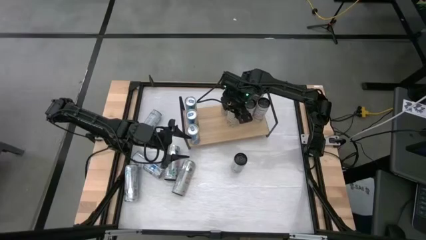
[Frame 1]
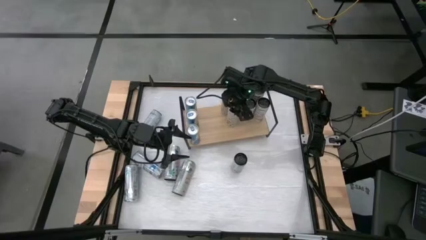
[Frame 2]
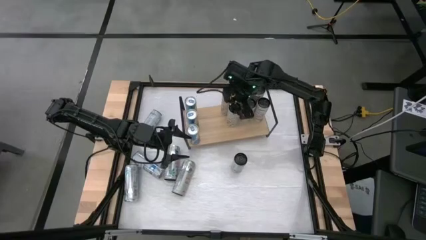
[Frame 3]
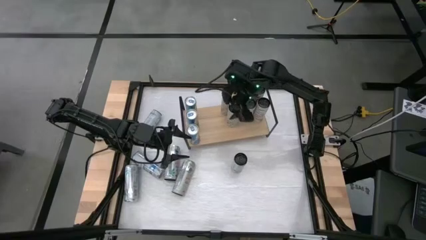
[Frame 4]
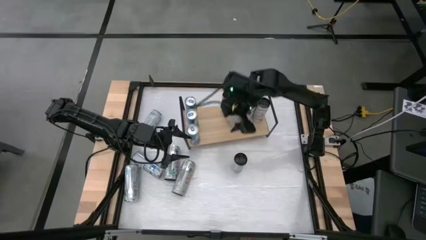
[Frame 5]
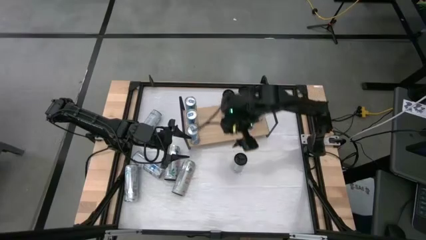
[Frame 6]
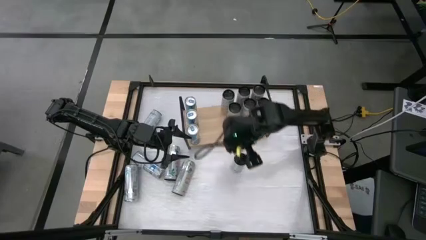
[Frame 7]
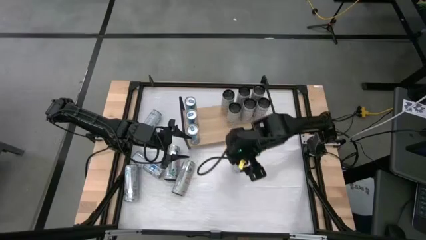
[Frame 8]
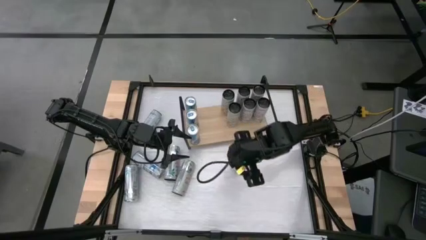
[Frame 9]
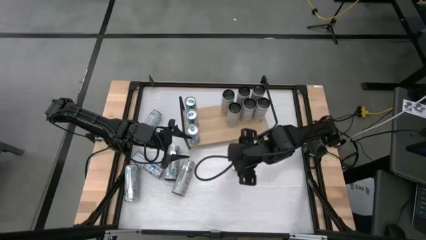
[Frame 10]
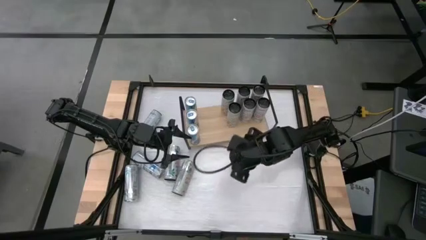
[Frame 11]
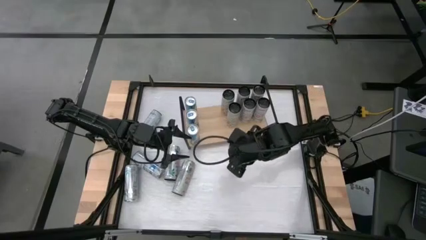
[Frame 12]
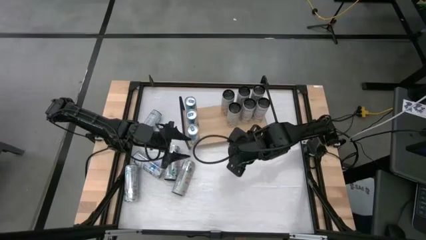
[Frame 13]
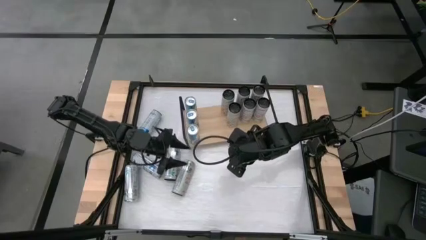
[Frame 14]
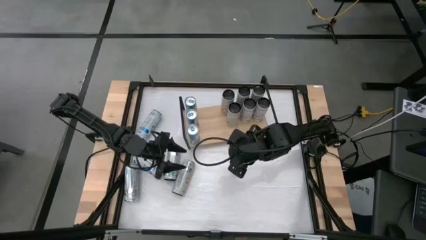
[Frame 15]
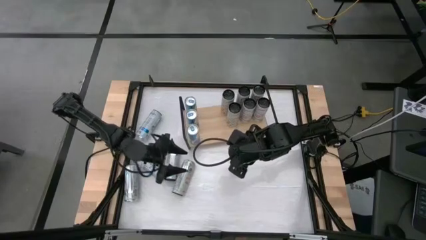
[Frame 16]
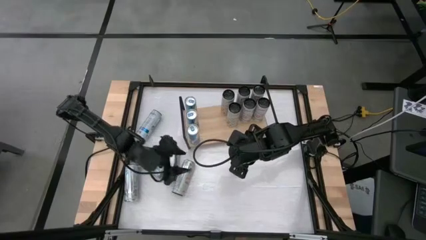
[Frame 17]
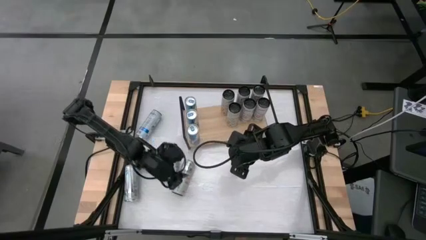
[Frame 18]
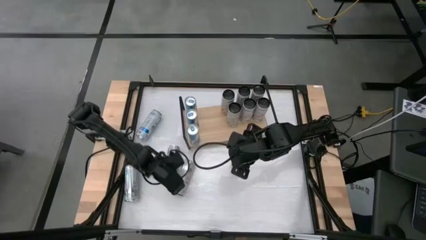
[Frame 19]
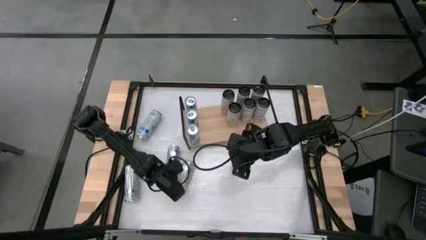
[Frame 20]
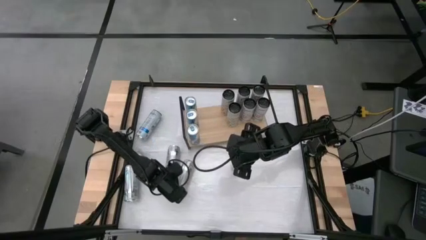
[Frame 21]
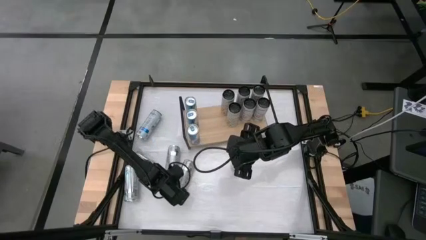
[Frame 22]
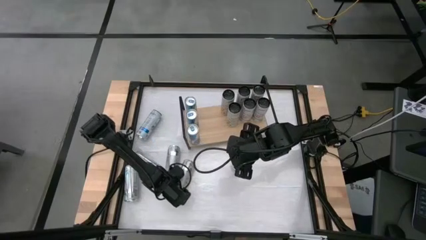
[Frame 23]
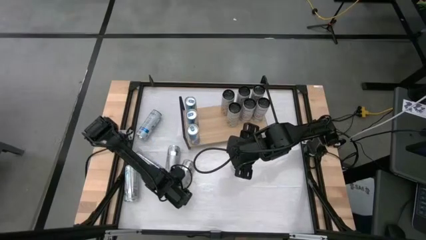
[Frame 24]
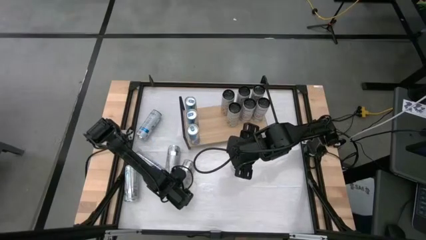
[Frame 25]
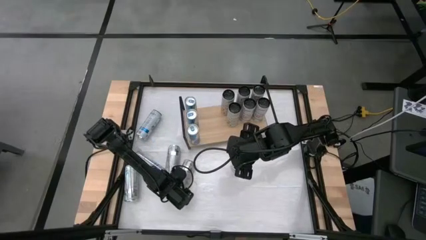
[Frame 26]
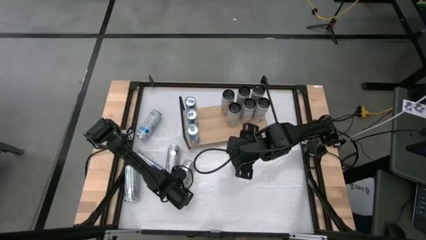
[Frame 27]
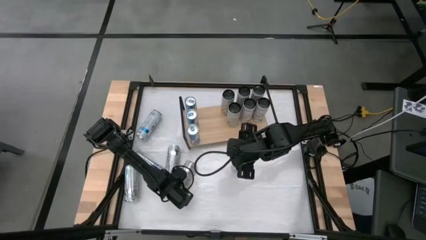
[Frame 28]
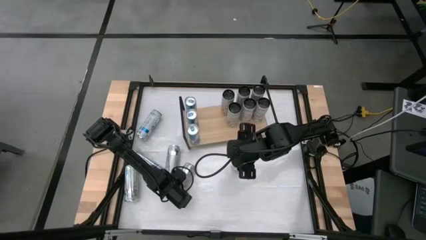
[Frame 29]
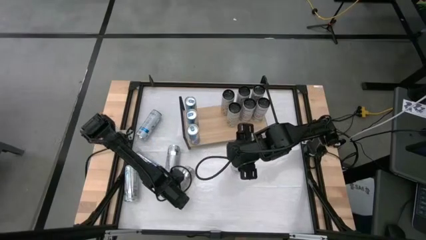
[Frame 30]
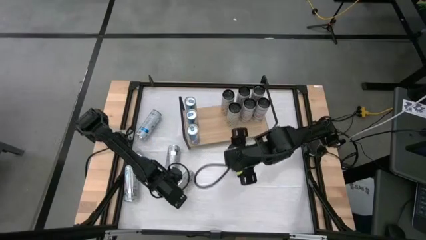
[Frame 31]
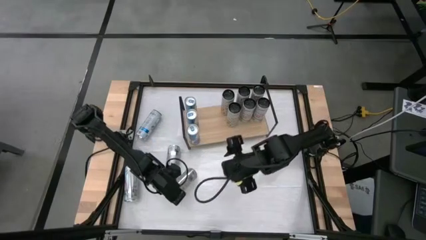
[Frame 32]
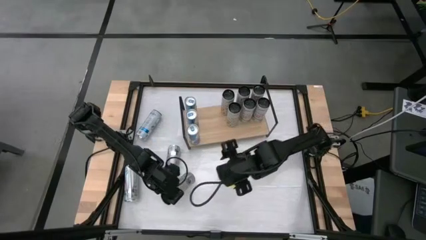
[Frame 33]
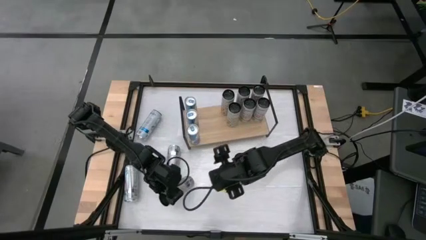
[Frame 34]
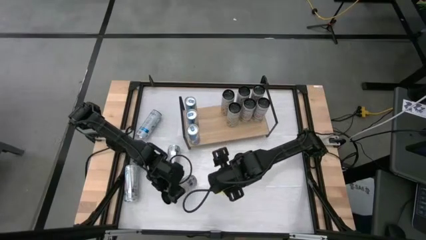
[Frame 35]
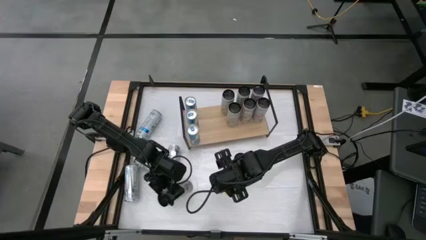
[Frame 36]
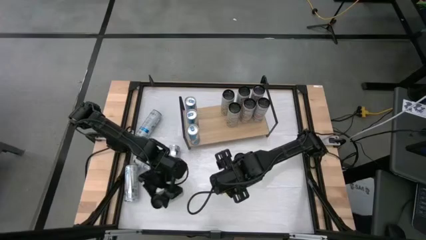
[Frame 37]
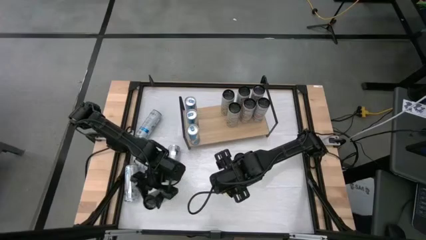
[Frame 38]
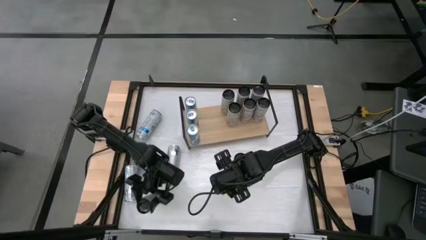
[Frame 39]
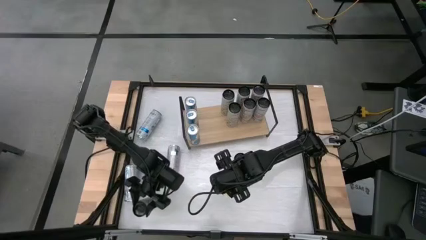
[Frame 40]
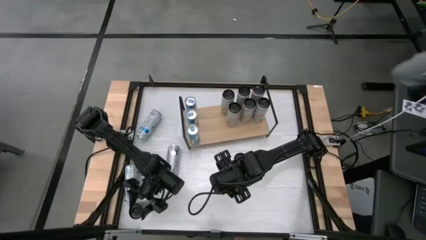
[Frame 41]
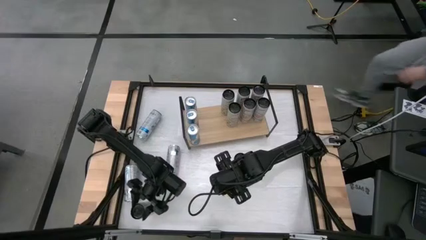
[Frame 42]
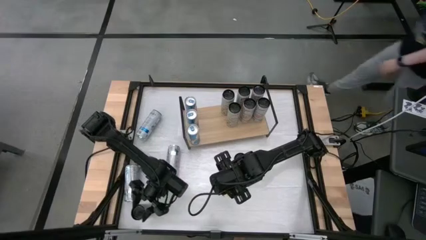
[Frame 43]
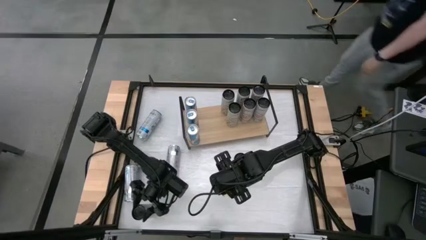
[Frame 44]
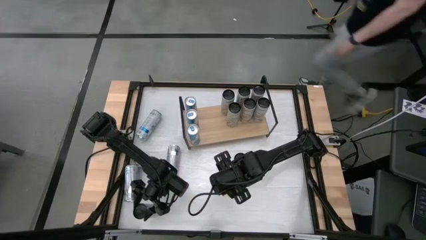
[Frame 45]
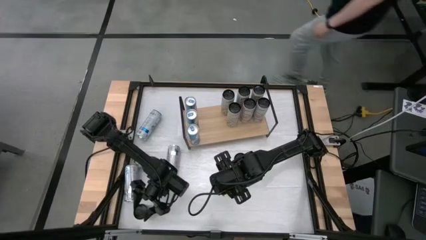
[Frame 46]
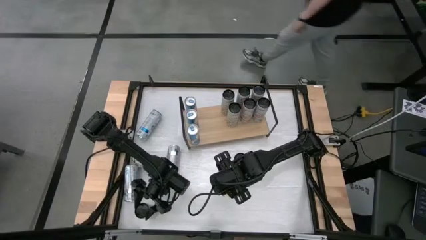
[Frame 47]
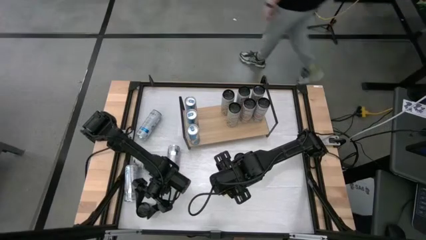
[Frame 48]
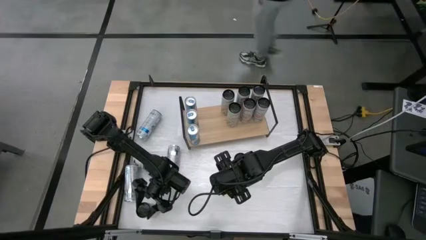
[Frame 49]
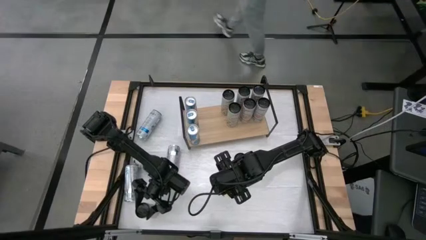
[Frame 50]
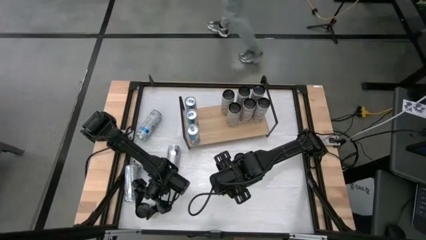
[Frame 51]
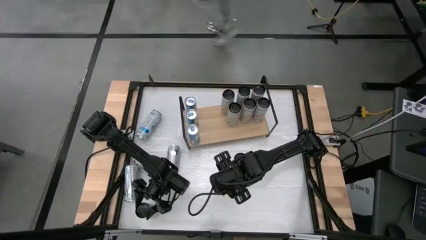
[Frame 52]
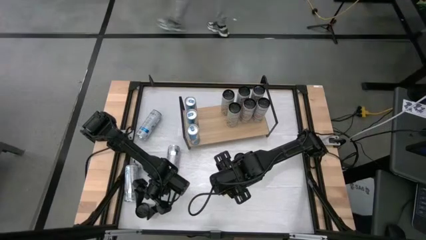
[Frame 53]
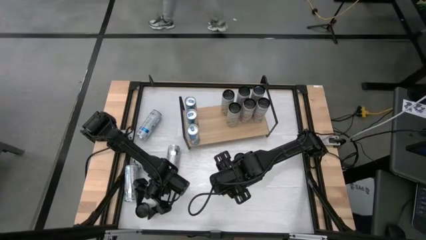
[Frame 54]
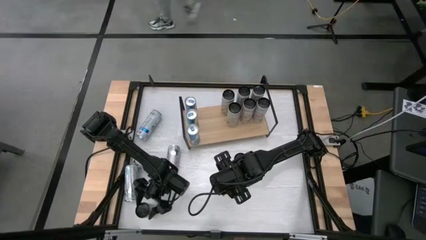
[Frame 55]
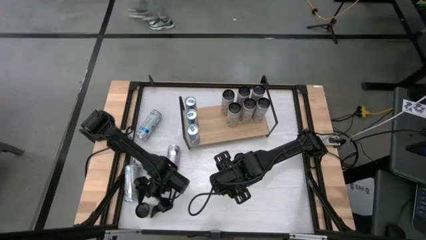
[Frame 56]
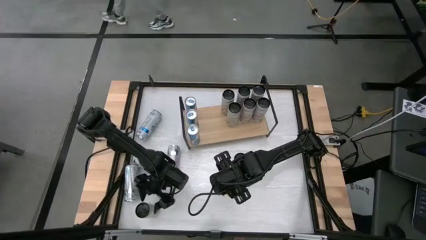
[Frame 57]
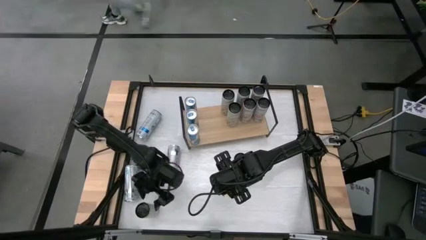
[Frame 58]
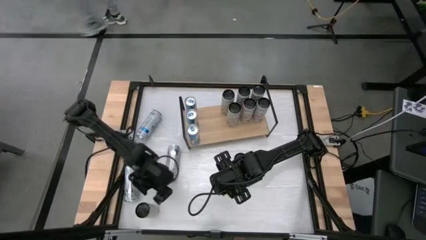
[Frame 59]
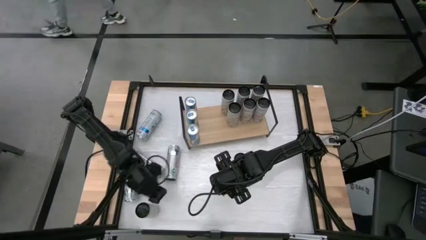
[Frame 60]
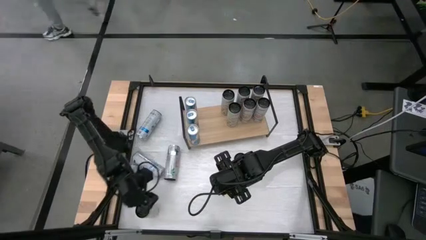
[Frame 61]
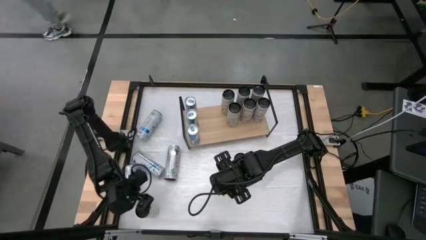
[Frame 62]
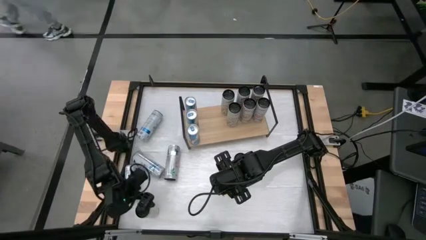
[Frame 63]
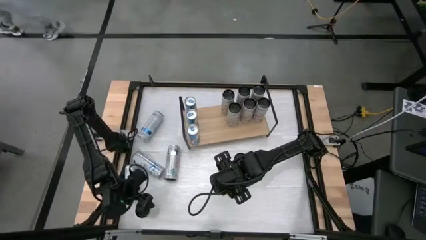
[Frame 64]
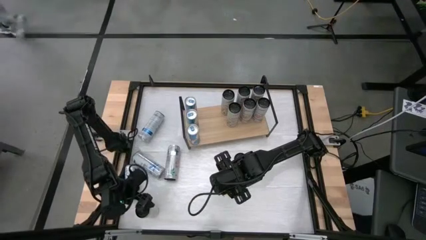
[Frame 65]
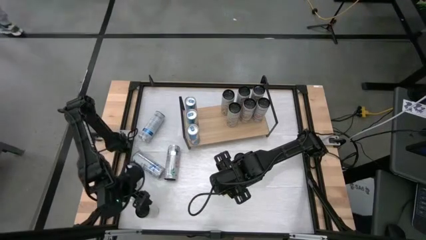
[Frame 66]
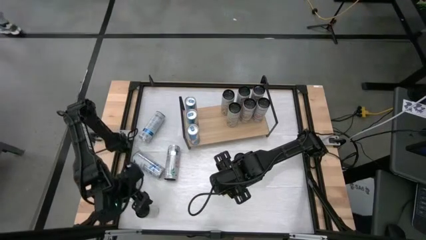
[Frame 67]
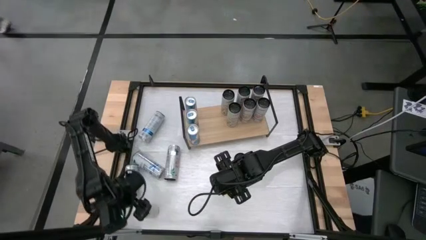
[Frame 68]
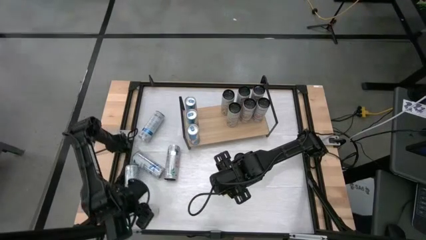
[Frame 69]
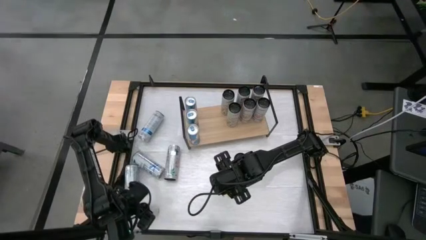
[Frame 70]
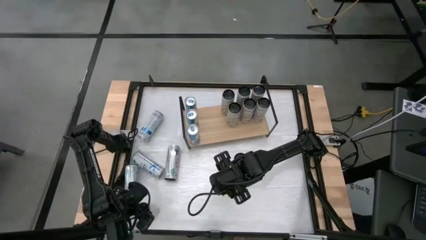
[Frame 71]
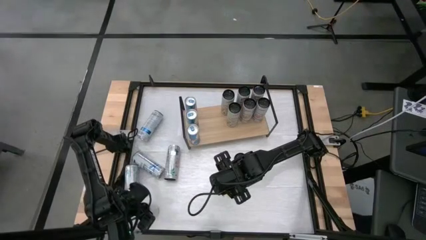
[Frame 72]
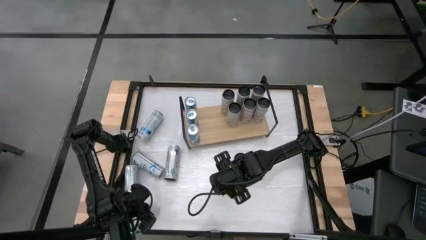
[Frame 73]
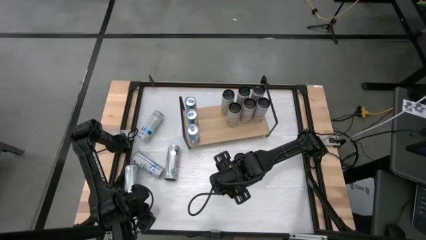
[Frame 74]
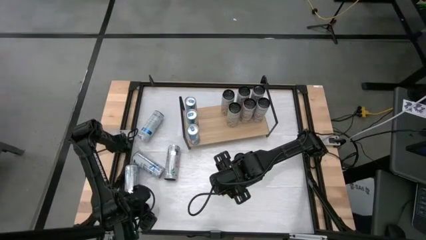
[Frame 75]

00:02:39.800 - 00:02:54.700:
Task: Place canned beverage on shelf
Put the white-yellow soda can on the shelf aligned with the other white-yellow soda can

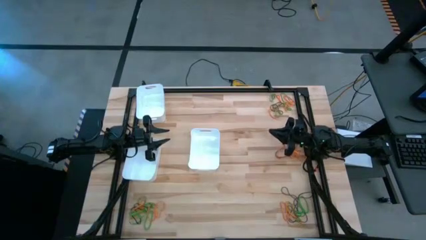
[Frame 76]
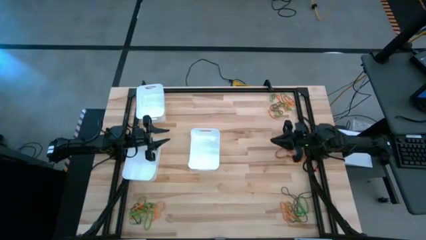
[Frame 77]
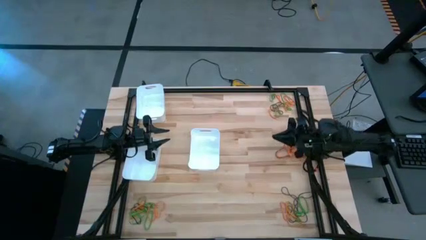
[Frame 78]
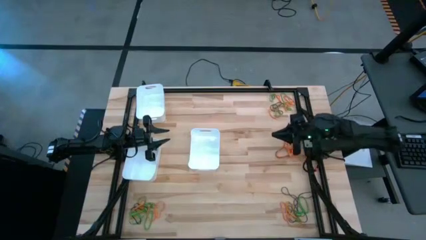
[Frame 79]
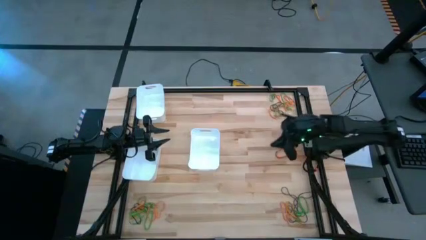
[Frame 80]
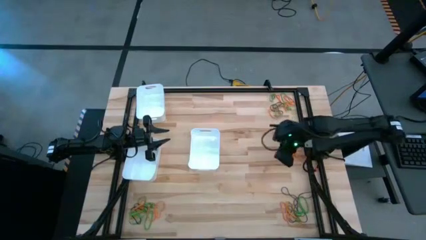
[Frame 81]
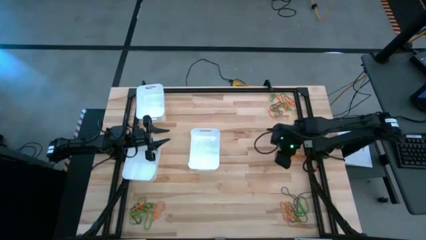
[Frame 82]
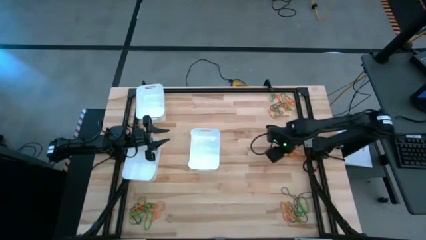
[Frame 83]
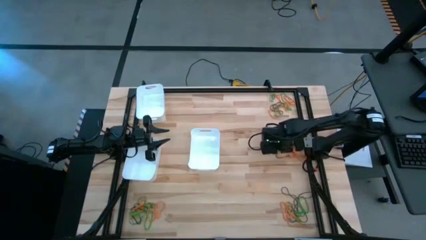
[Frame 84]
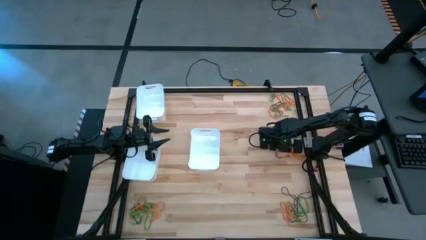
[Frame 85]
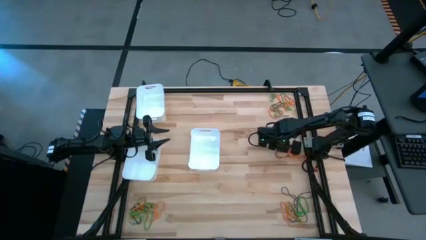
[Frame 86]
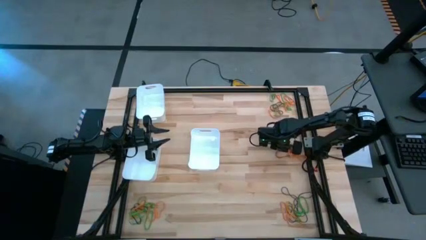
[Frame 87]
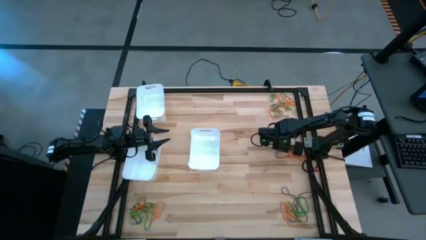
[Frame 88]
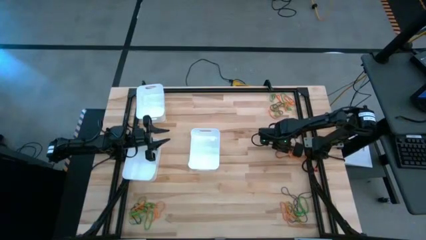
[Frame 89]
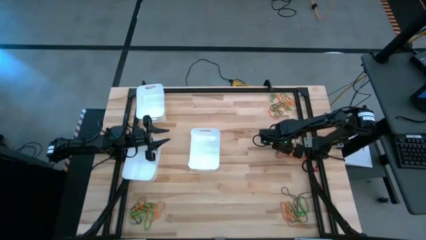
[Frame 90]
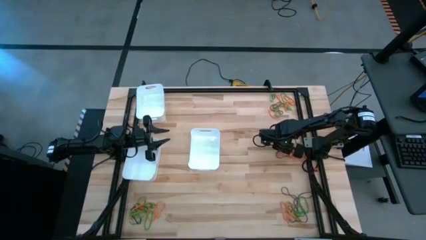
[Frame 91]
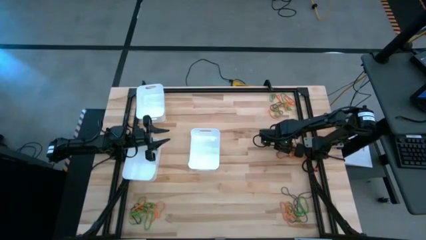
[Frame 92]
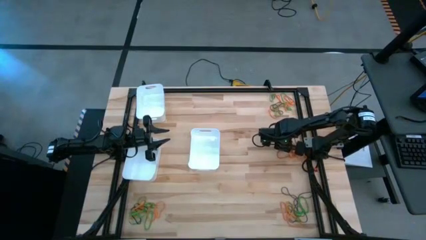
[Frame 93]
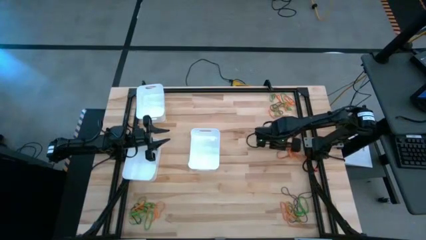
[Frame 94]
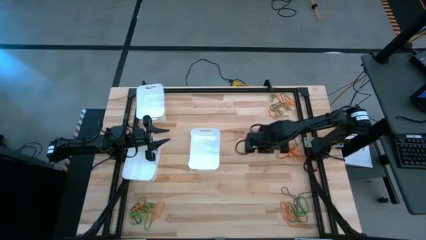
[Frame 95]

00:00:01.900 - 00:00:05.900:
Task: Sort rubber bands into baskets
Put the orange rubber band into the bottom right white bin
